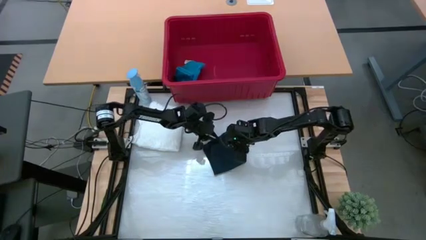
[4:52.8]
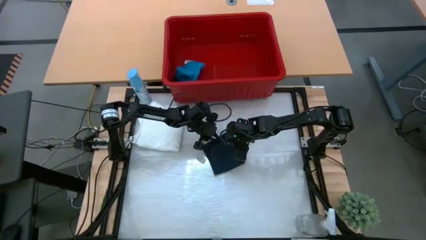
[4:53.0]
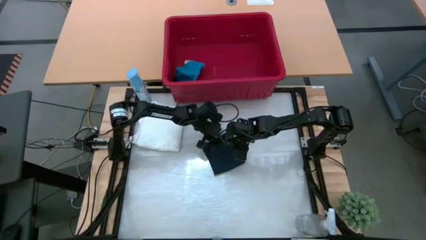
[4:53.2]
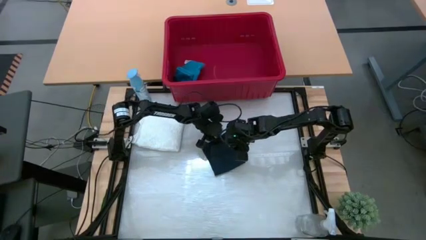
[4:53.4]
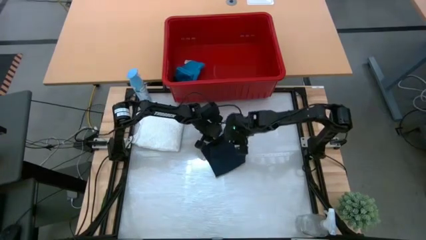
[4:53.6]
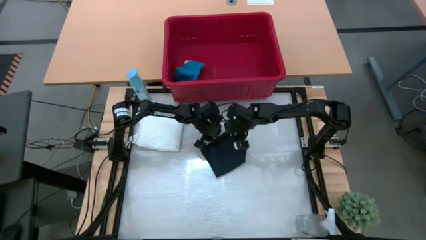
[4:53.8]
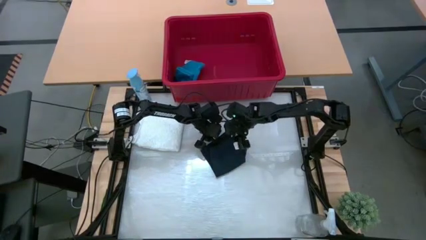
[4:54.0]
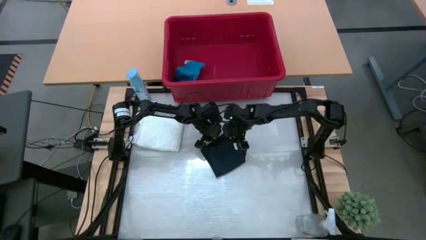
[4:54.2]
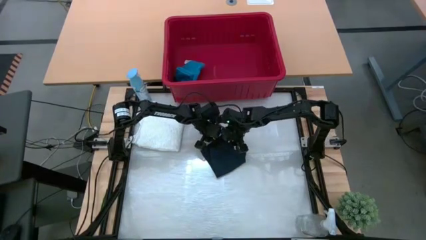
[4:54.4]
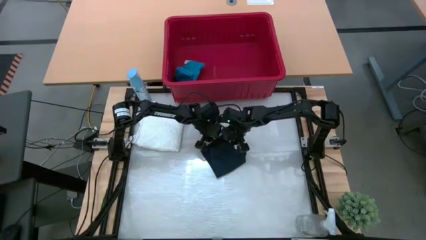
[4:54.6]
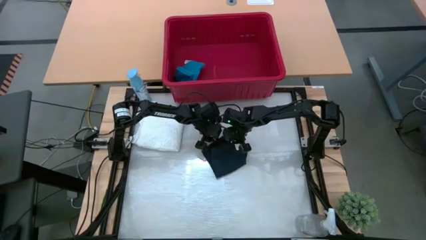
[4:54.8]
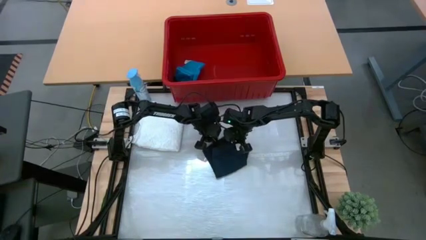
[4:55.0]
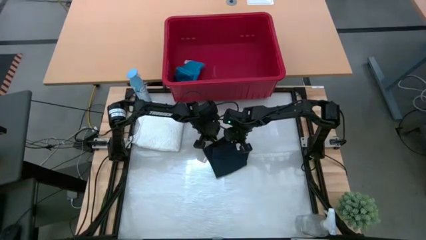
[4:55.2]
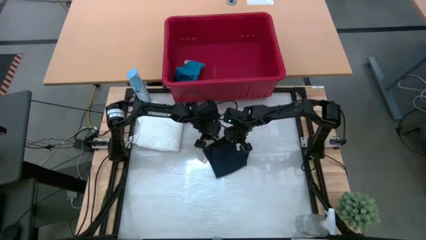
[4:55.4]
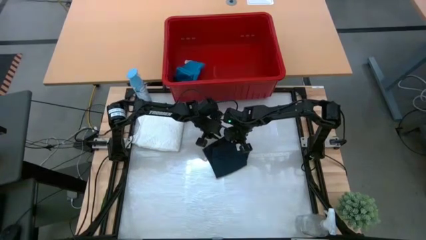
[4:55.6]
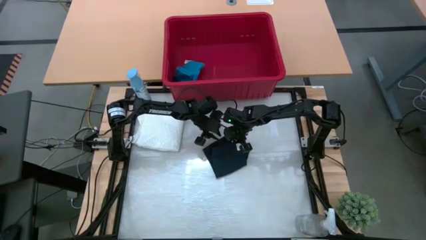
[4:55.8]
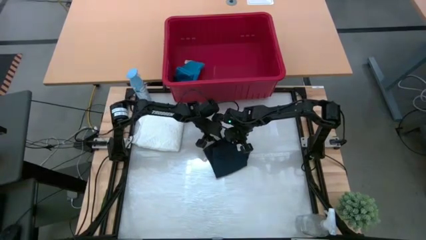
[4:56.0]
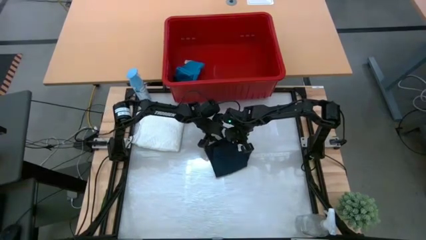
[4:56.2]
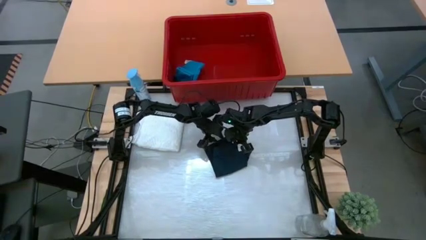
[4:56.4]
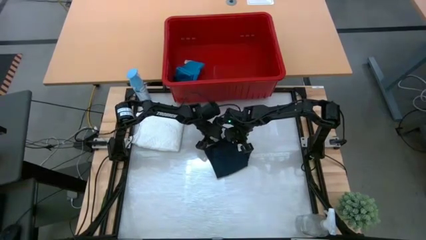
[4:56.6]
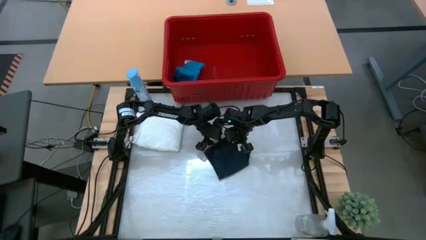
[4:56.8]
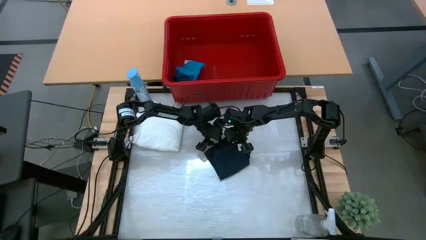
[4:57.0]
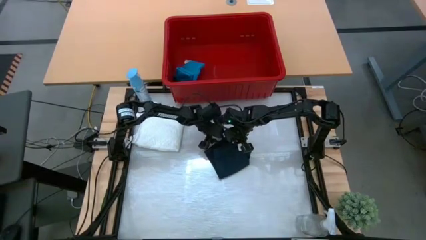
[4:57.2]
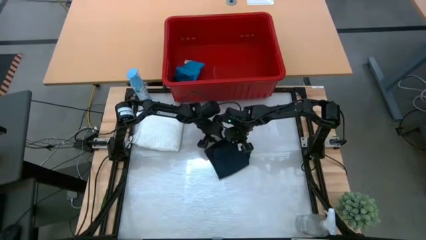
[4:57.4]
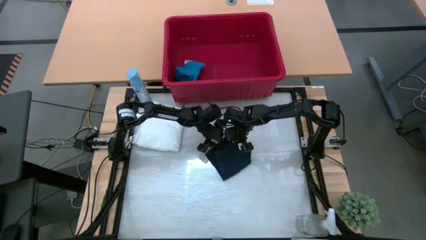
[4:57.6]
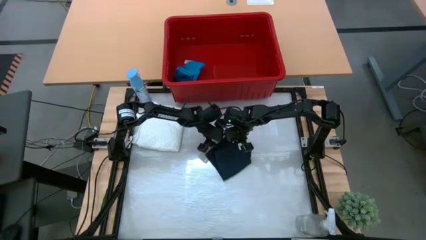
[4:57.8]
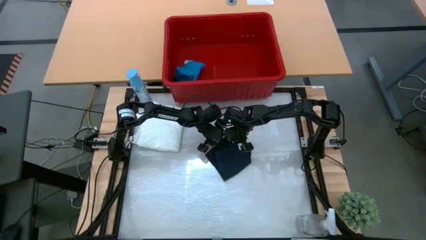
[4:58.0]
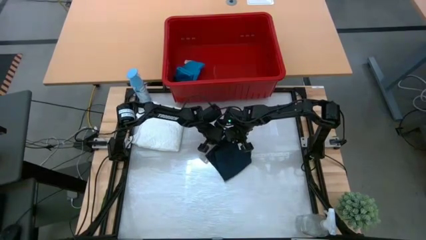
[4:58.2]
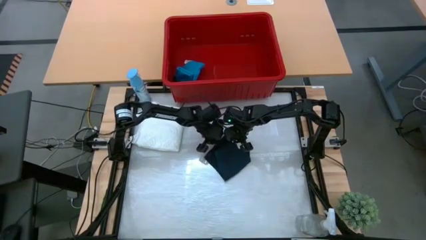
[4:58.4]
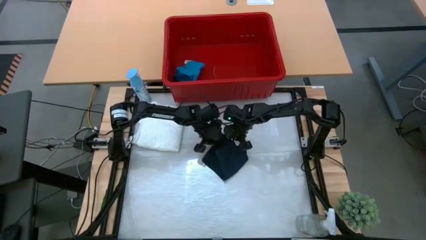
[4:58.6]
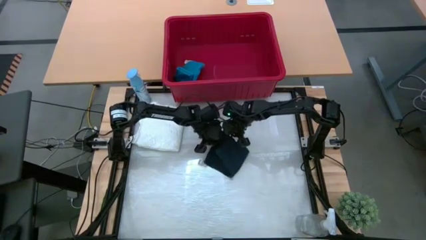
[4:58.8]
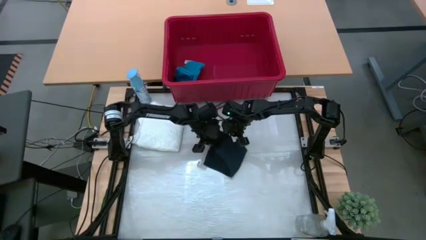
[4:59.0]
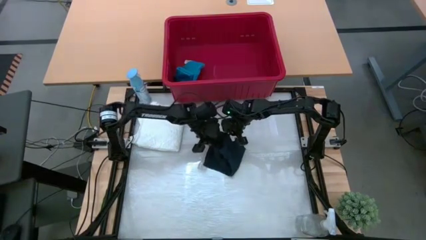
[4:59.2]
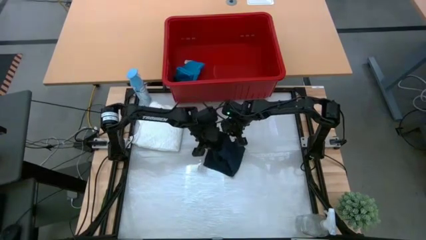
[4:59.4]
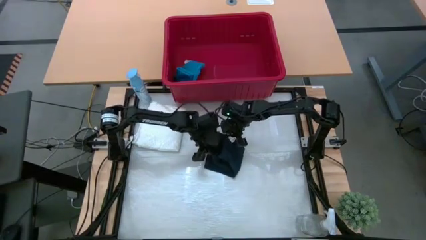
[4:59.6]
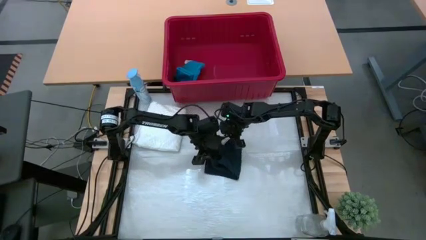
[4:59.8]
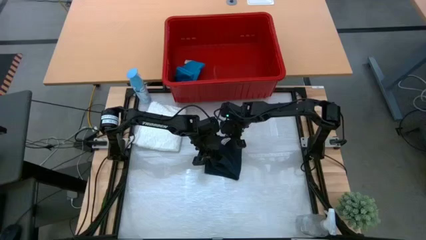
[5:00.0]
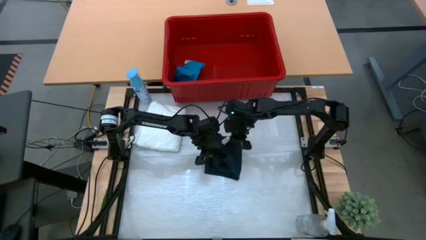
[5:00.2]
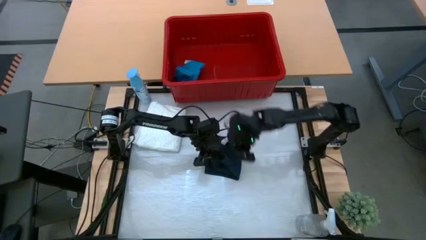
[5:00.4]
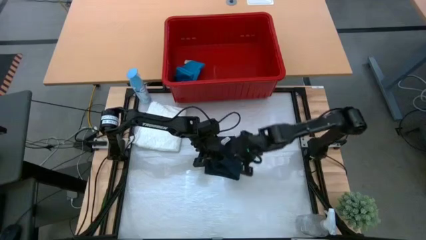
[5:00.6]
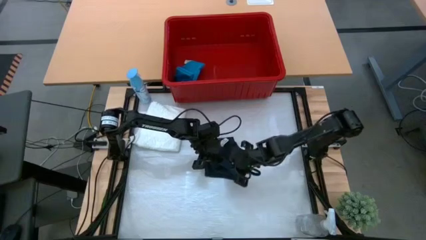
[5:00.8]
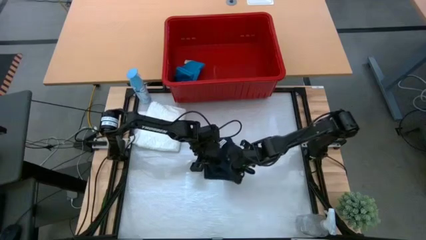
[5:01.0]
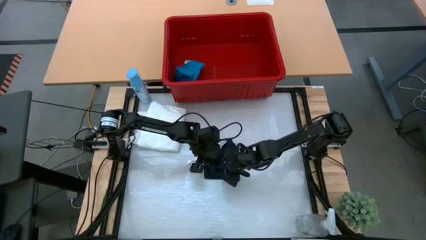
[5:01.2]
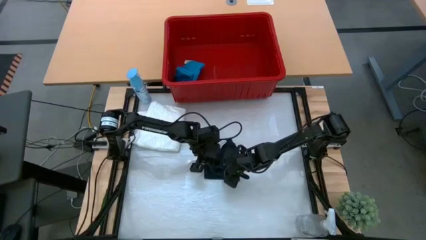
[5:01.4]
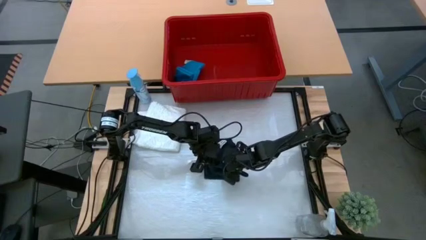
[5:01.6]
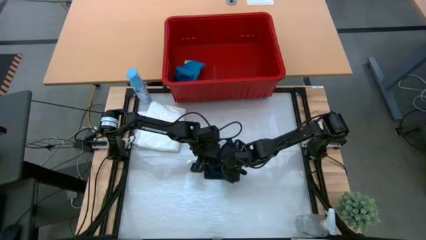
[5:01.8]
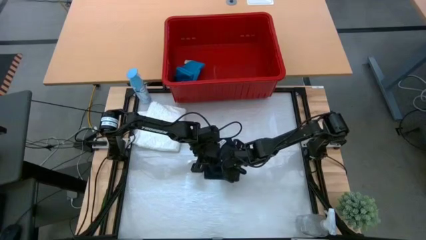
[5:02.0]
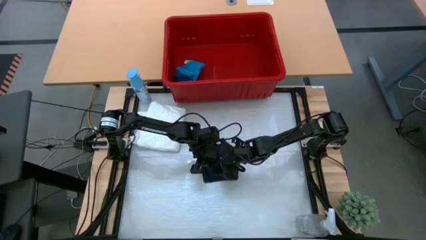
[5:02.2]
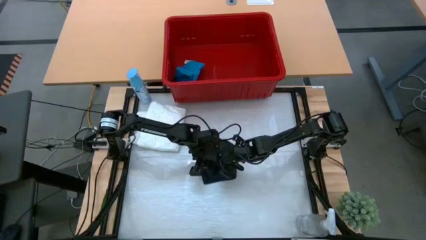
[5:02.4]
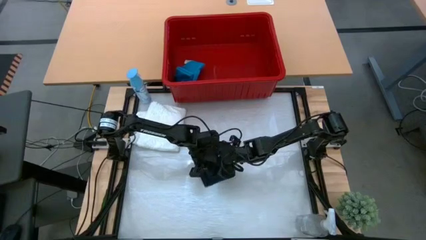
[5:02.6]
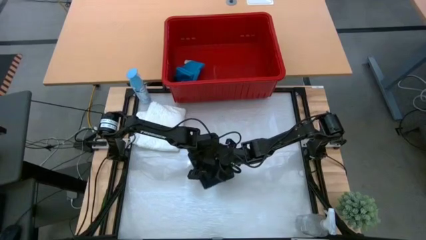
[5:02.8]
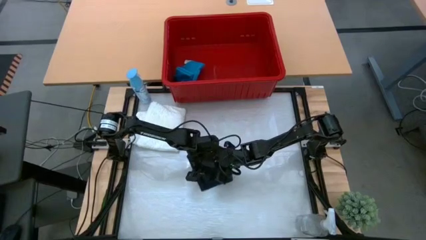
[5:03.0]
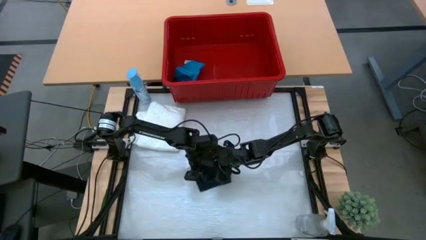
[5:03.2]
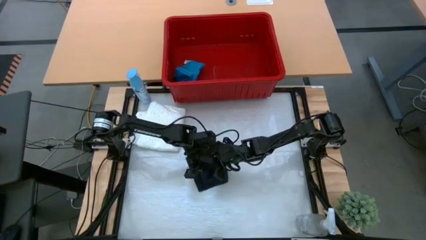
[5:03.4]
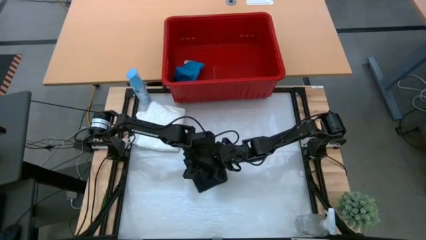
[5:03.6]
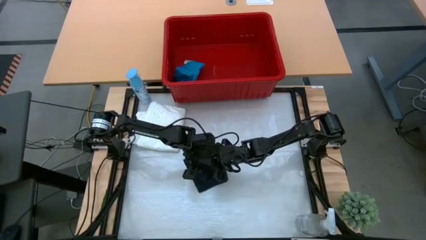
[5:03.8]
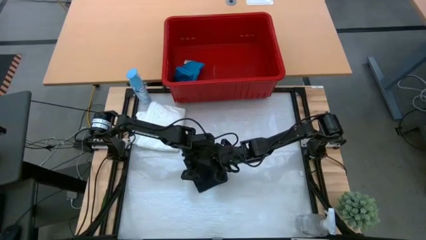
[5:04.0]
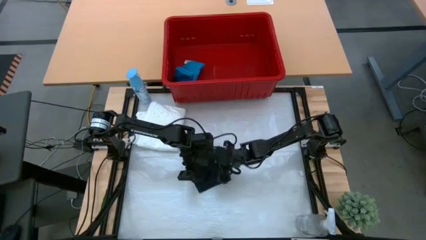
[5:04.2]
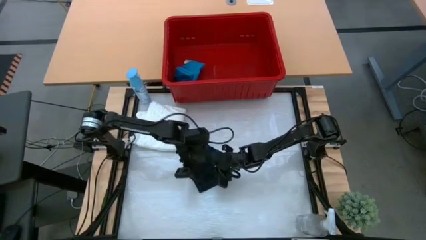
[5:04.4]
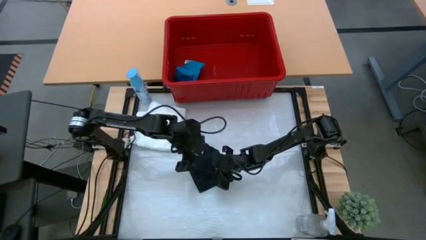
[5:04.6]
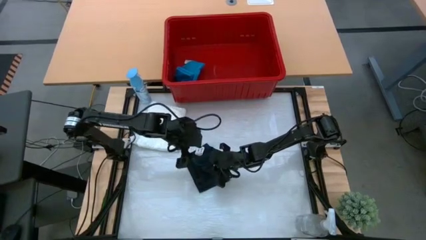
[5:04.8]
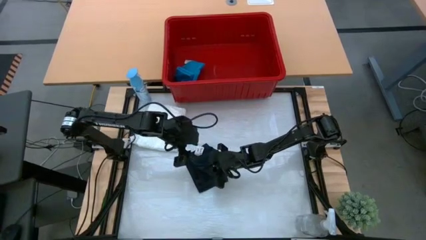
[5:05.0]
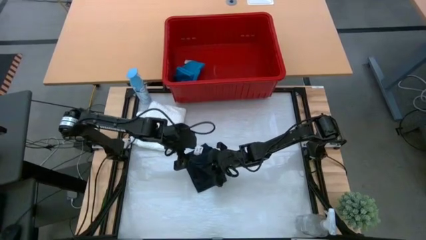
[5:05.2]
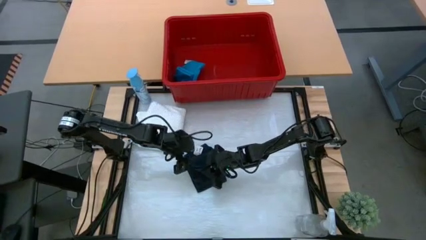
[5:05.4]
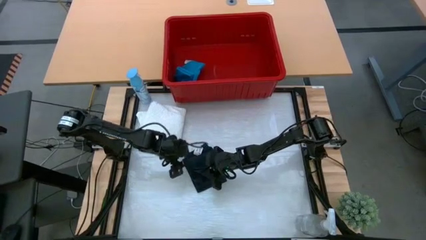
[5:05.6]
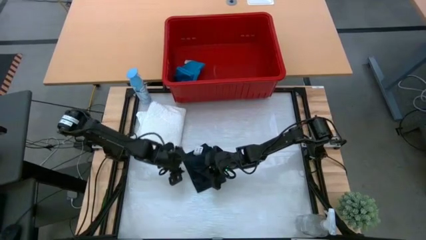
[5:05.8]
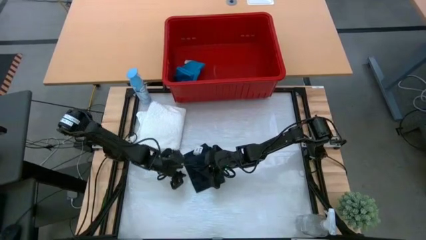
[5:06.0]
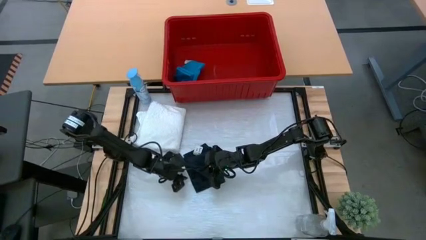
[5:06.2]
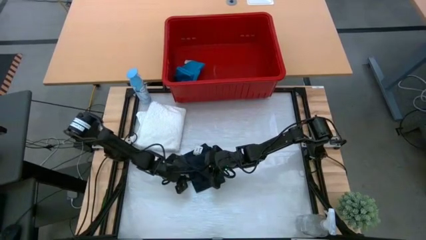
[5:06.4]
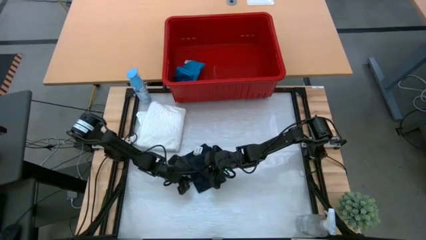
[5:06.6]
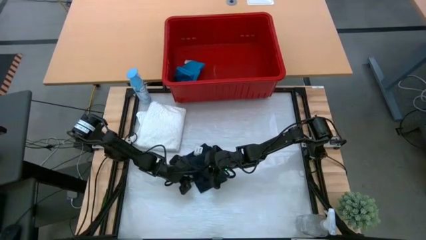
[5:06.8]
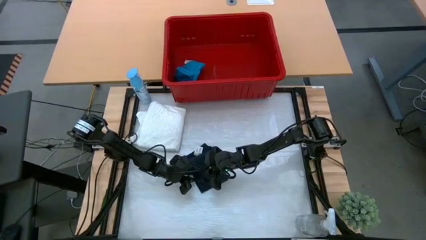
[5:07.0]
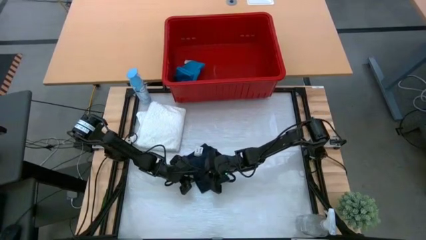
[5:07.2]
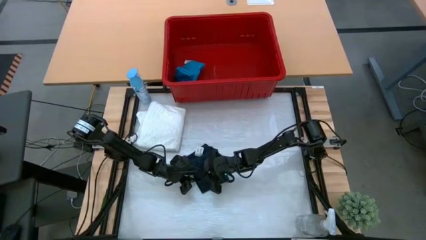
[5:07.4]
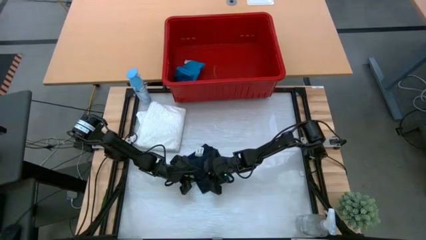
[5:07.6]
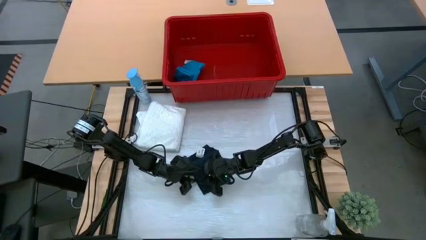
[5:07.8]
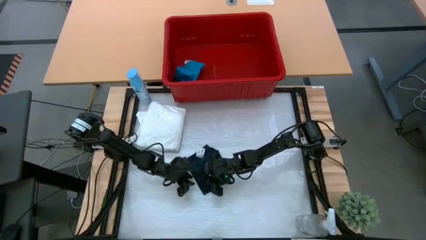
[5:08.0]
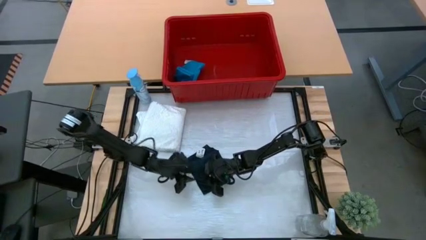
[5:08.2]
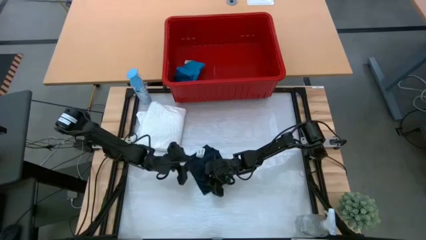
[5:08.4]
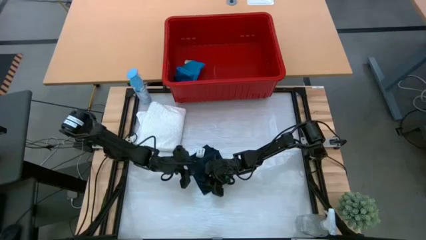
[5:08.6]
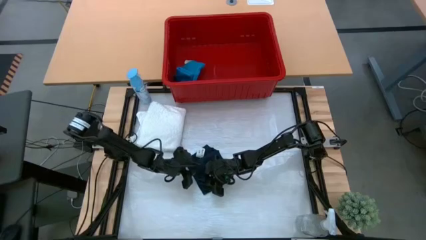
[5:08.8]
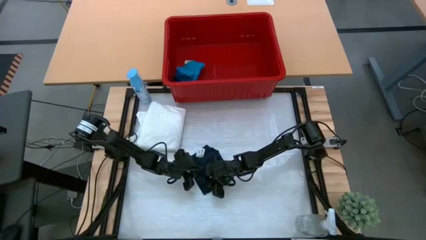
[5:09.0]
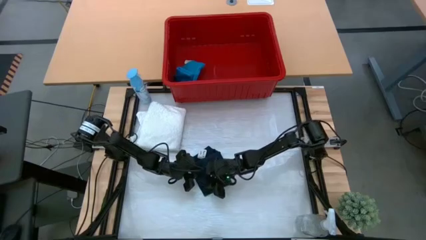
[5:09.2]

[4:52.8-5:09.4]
Task: Fold Laundry from Bin
Fold the black shorts
